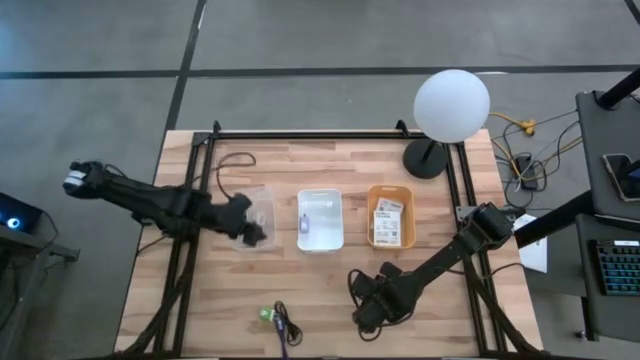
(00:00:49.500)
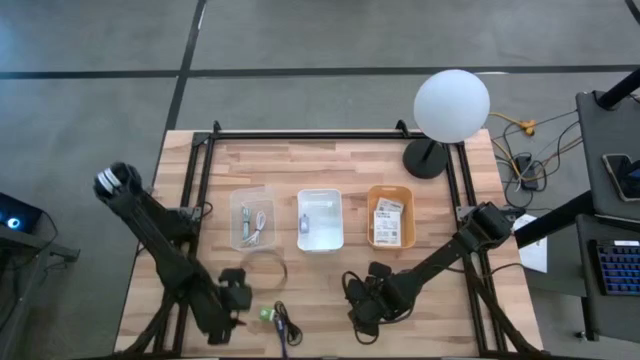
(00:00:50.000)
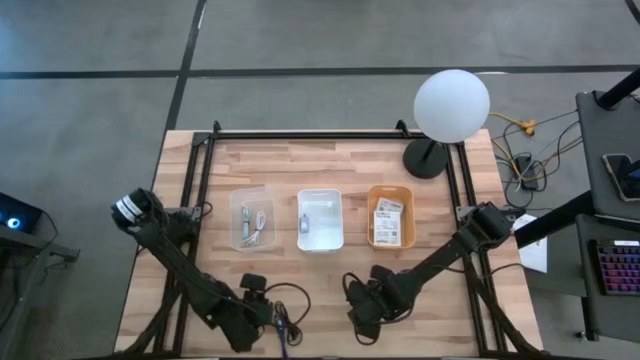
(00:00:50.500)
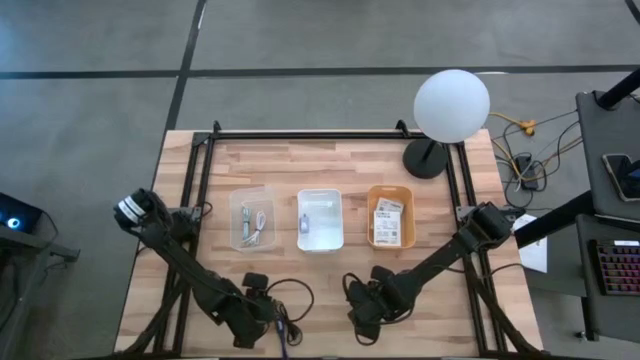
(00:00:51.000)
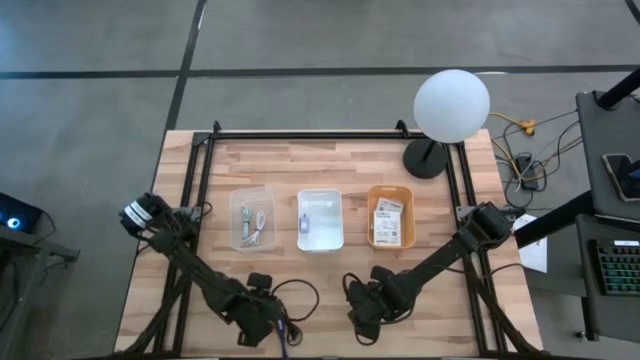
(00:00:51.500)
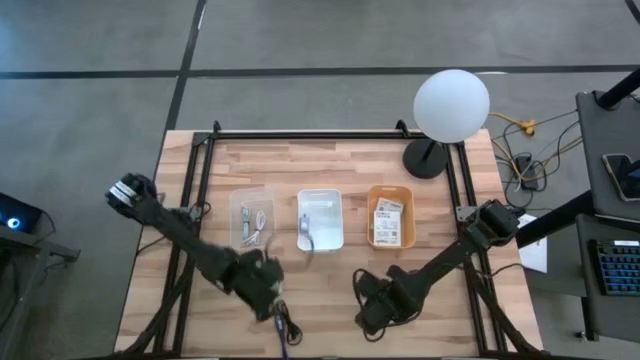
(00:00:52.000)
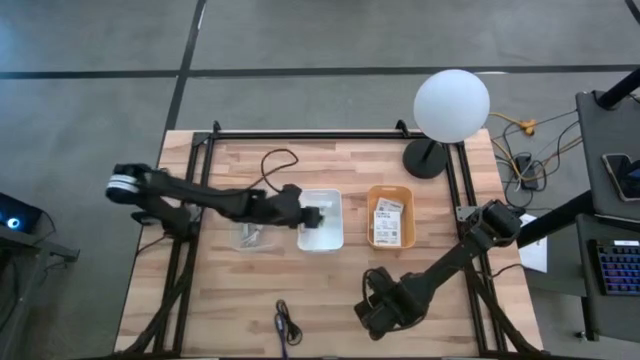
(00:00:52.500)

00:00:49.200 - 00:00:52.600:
Task: Pick and place items into bin
Put the green charger adapter into the white bin

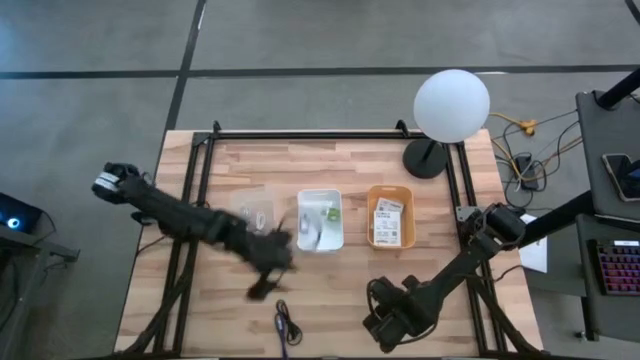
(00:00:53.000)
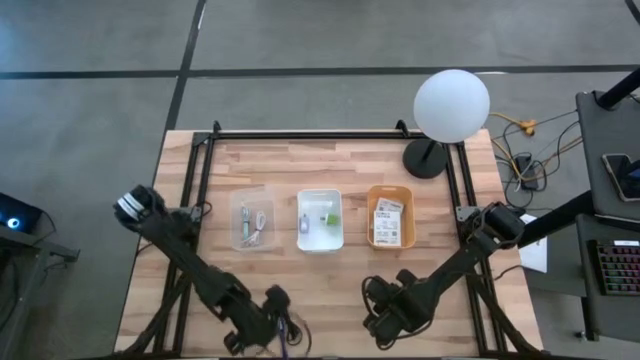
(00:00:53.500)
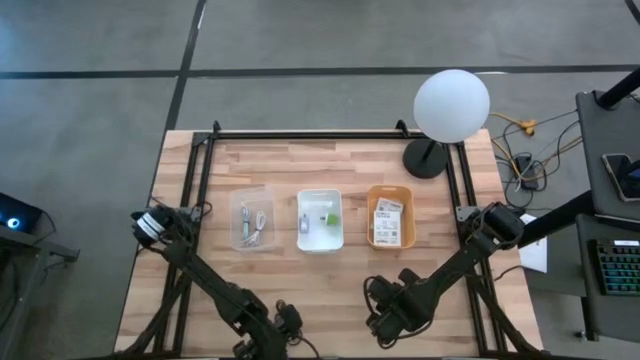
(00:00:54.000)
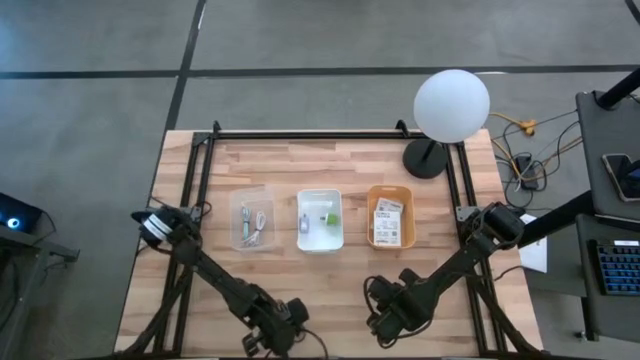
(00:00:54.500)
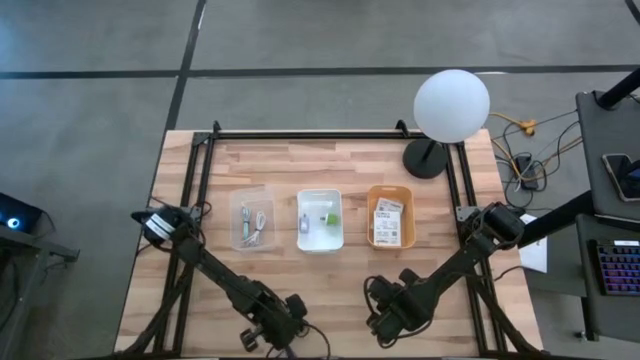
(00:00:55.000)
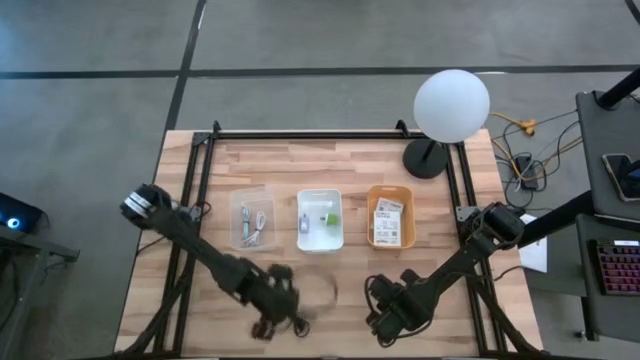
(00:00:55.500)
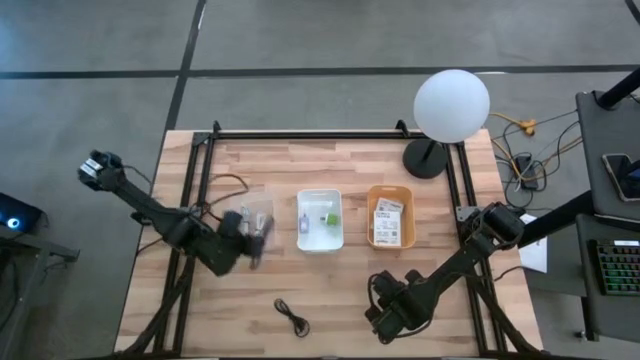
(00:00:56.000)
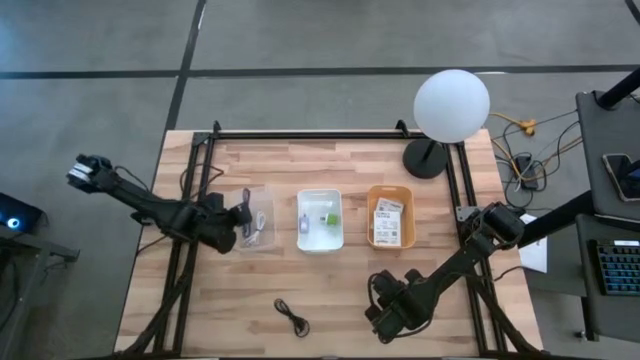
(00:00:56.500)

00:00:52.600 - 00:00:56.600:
Put the blue charger cable into the transparent bin

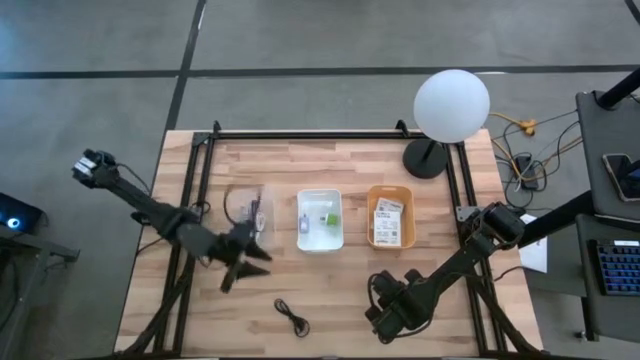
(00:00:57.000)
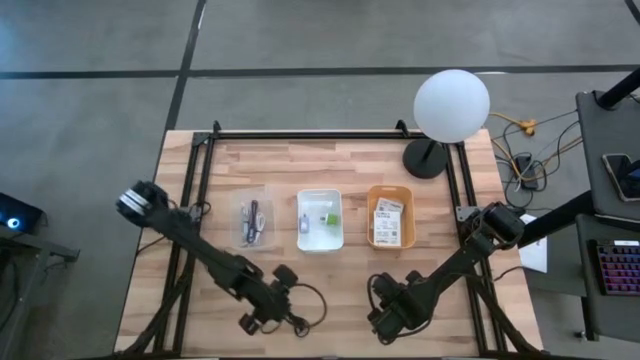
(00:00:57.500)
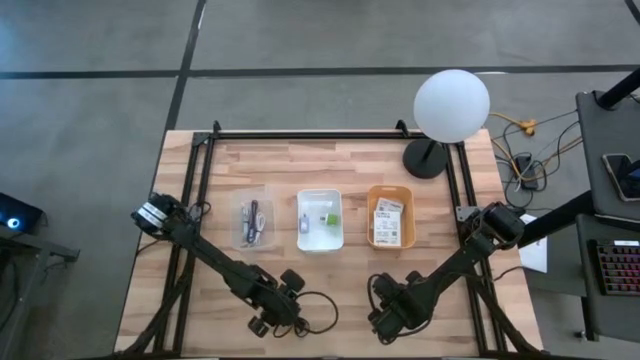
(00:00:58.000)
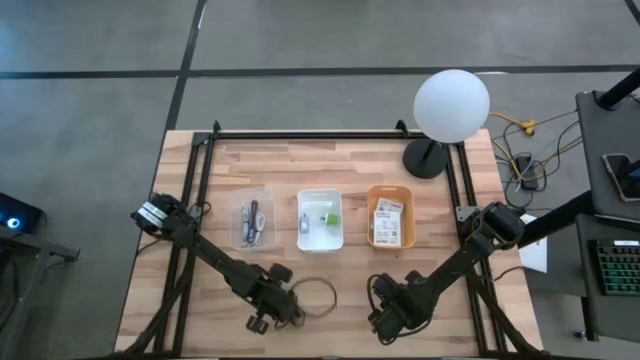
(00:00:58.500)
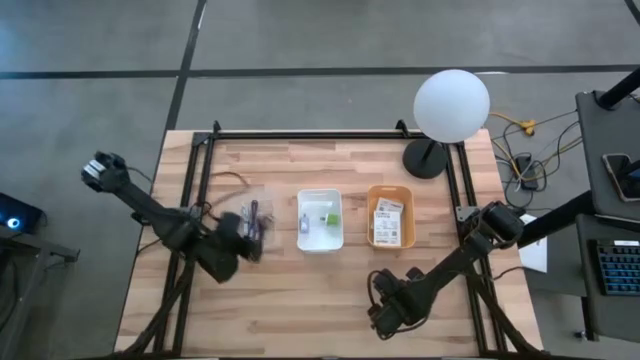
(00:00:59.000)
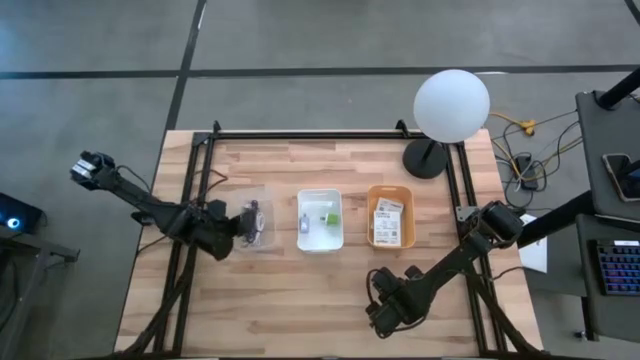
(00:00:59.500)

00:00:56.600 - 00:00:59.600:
Put the black charger cable into the transparent bin

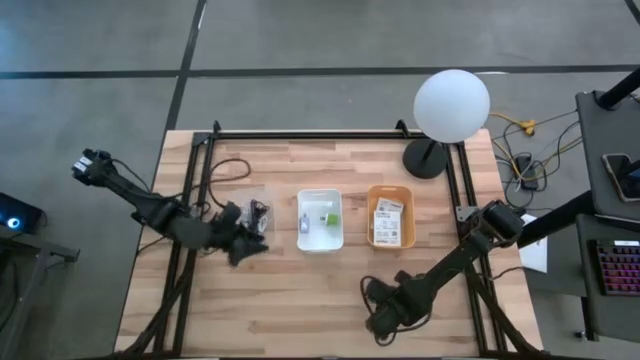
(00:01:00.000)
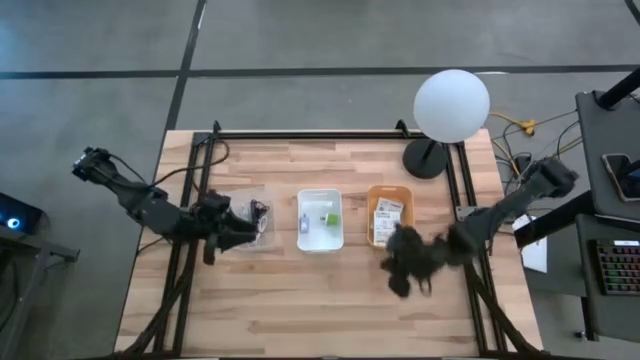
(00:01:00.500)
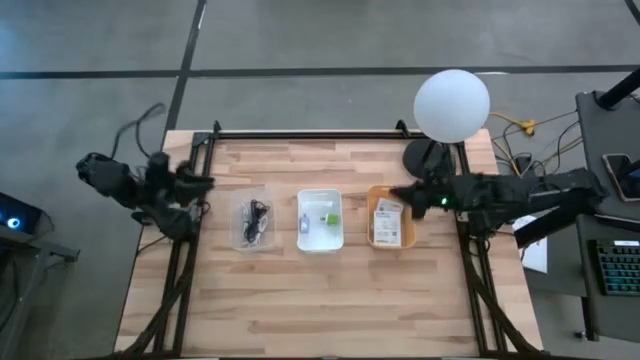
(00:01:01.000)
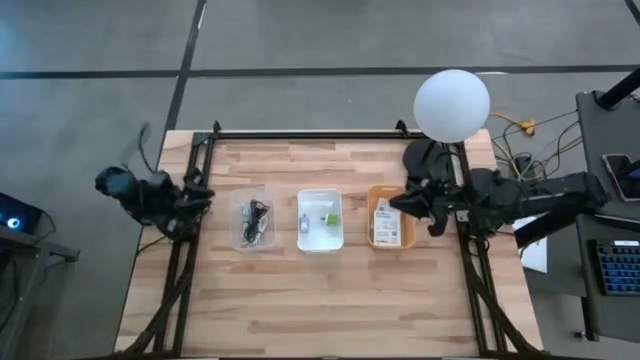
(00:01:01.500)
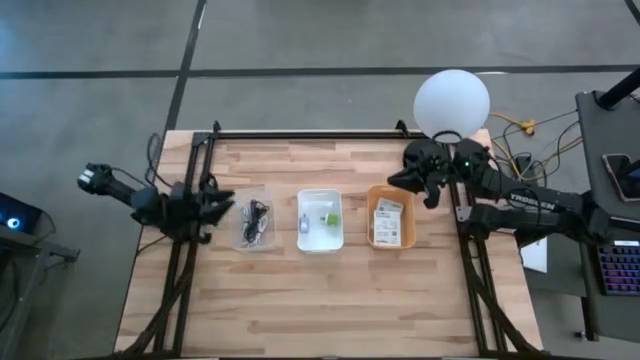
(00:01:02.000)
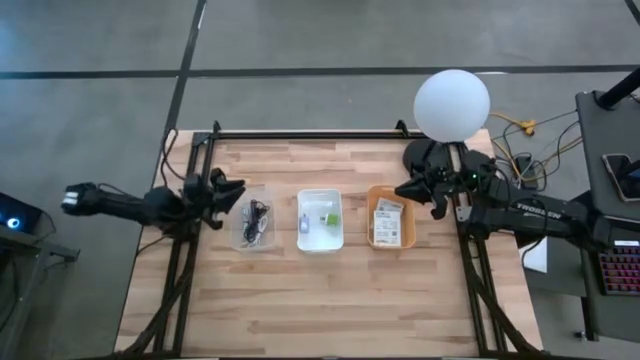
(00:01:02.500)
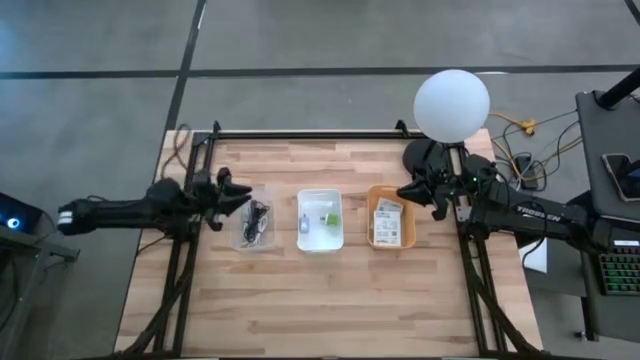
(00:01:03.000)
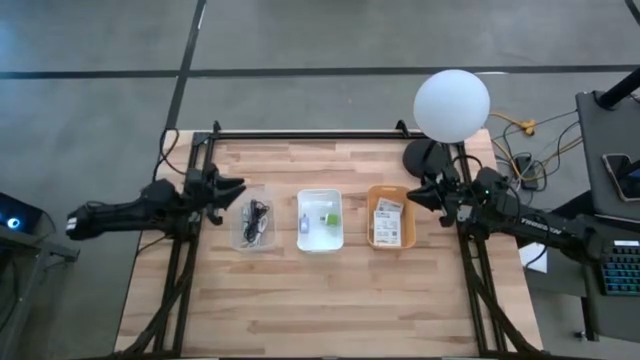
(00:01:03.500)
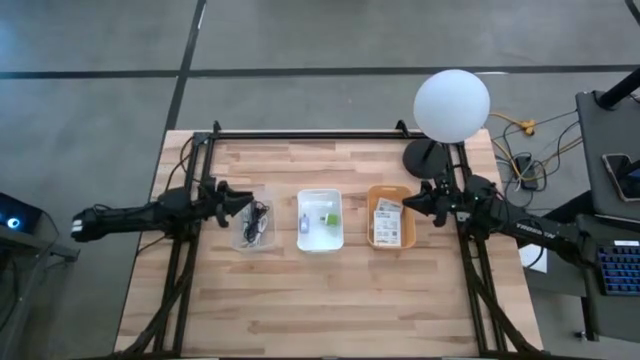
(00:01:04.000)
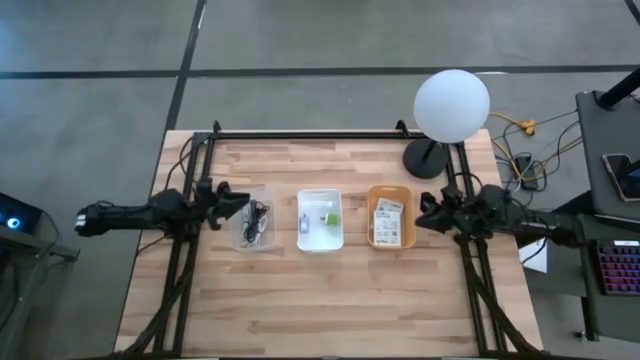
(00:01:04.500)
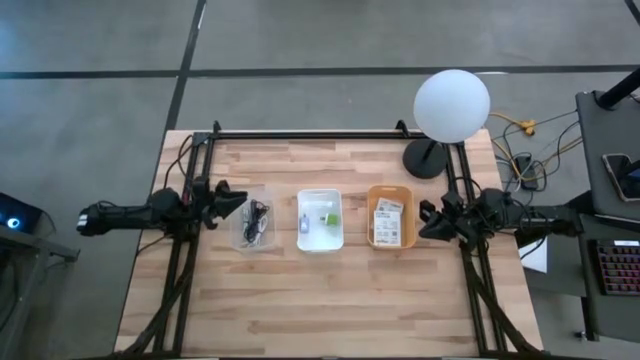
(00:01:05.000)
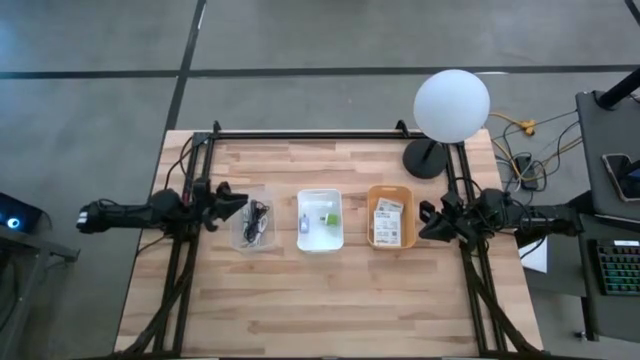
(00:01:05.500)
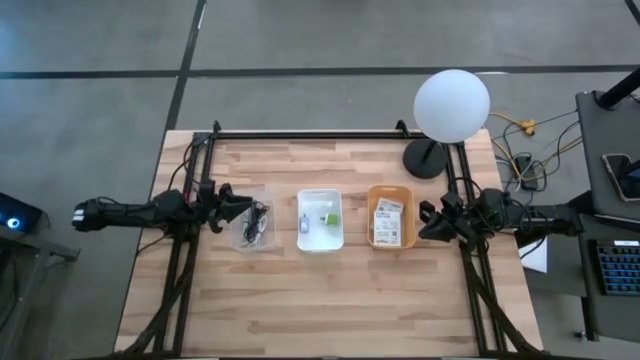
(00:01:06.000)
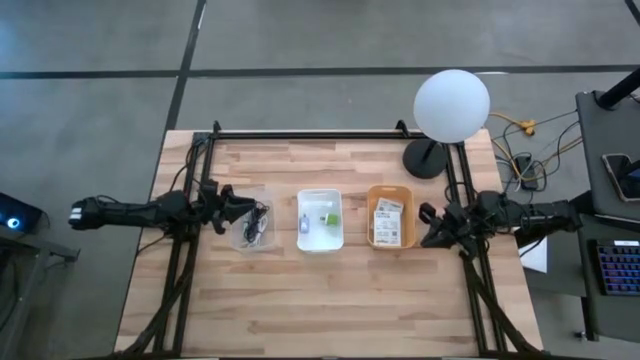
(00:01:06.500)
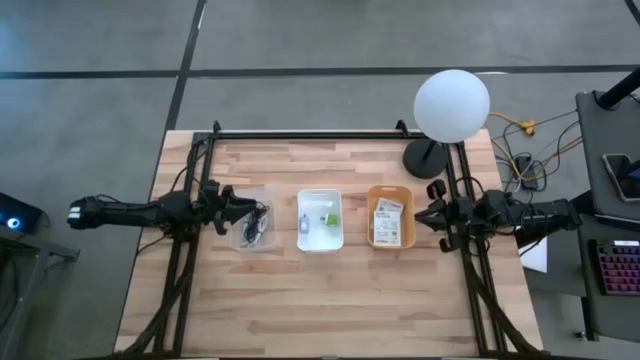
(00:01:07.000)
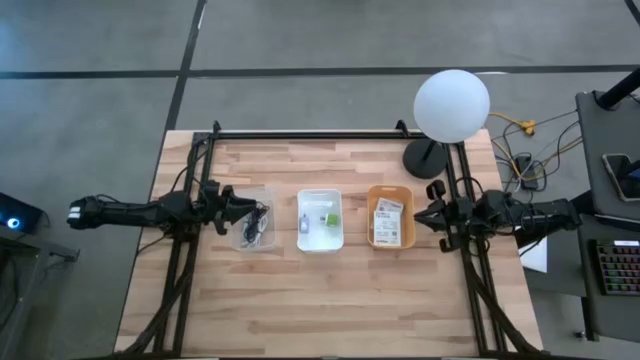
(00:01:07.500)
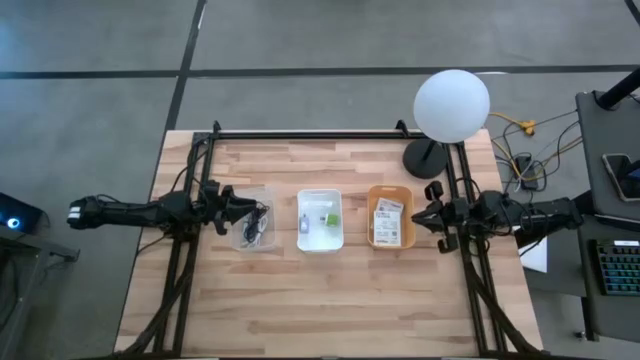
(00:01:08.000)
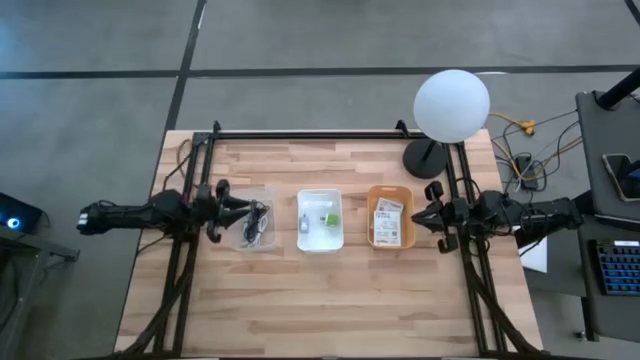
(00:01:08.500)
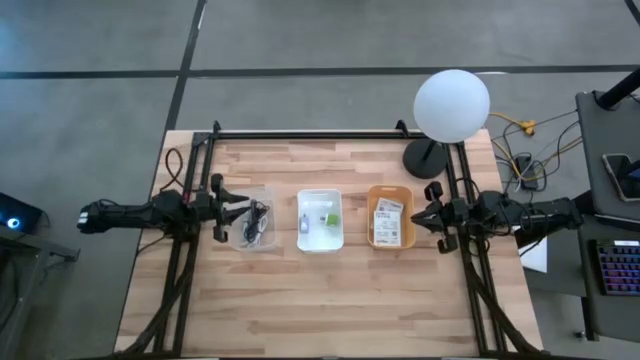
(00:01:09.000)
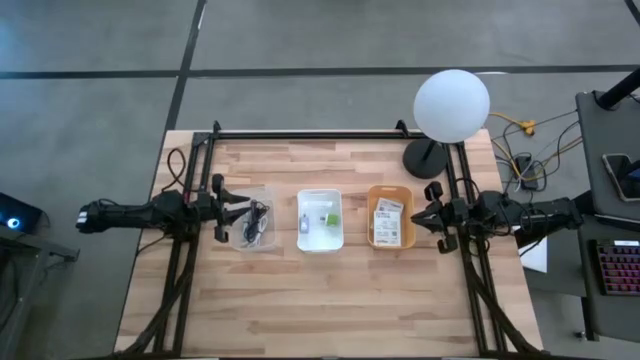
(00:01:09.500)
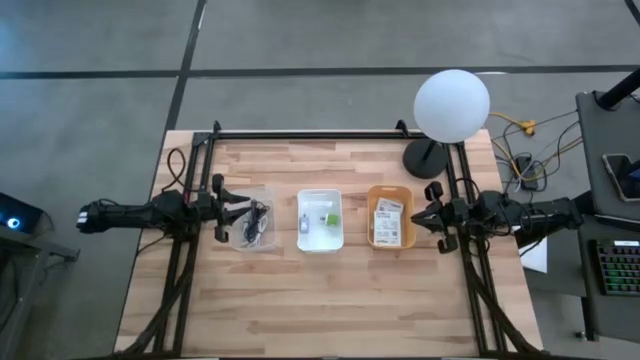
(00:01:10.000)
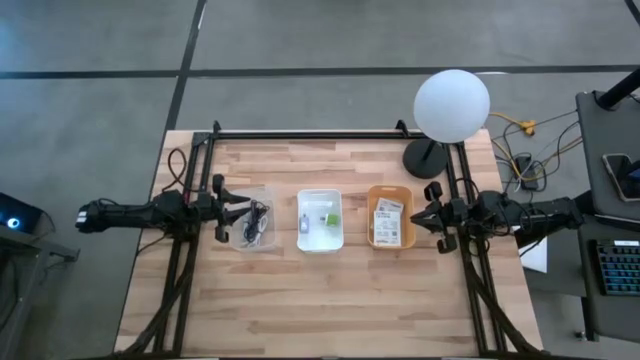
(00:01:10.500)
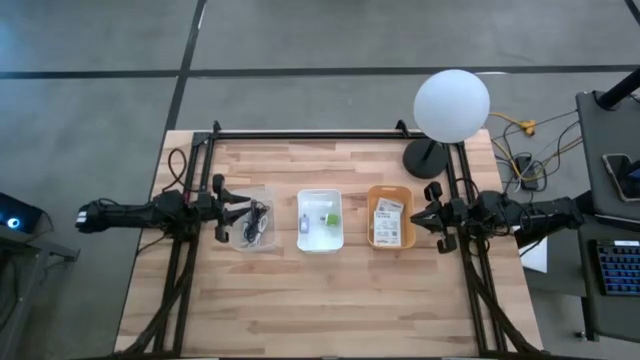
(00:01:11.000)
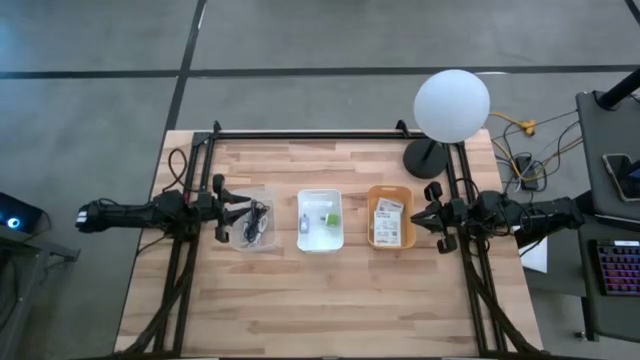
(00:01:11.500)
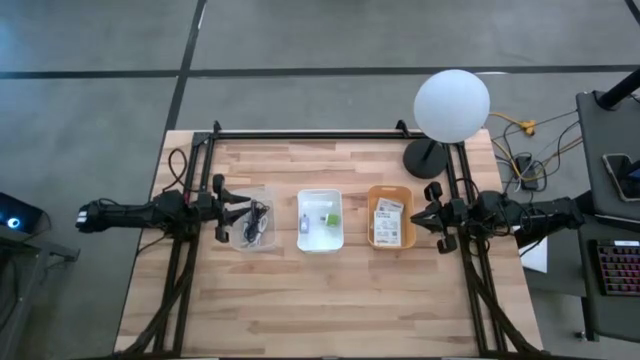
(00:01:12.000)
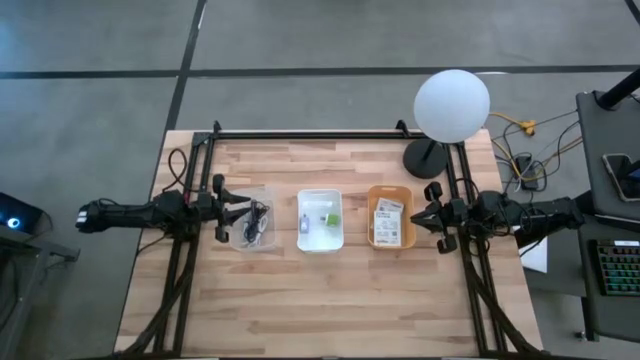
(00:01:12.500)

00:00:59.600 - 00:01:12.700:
Return to Home Position
